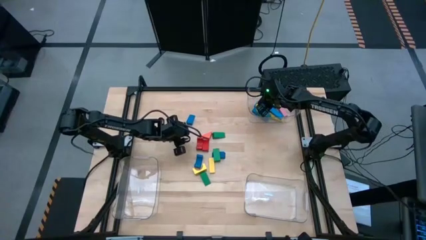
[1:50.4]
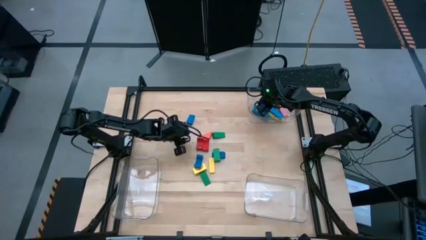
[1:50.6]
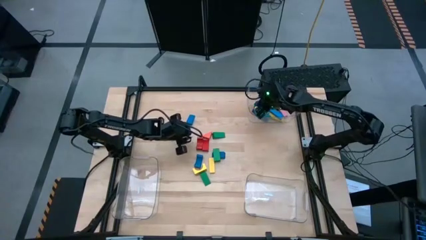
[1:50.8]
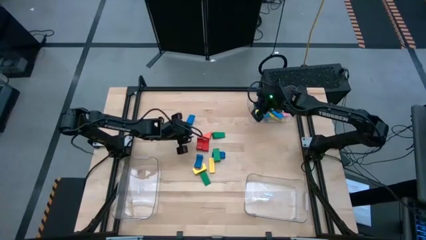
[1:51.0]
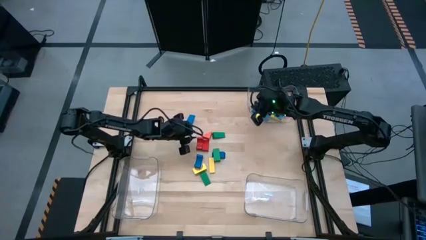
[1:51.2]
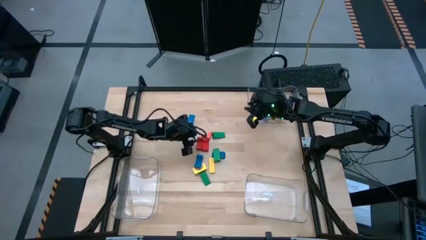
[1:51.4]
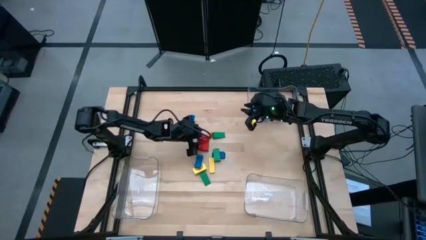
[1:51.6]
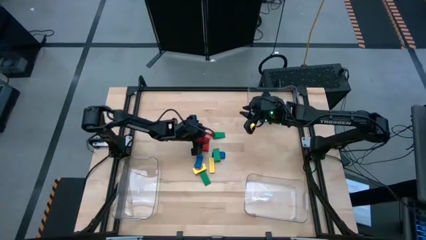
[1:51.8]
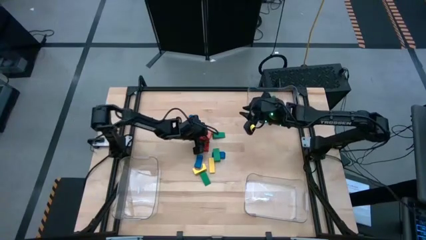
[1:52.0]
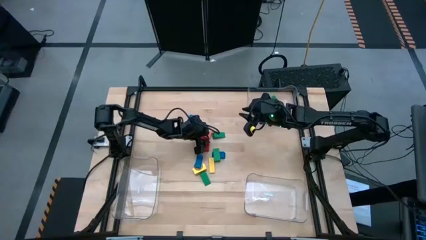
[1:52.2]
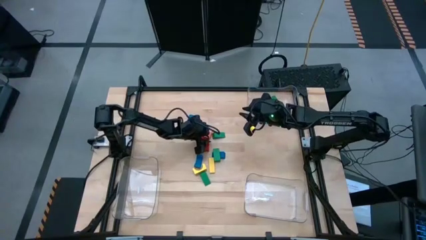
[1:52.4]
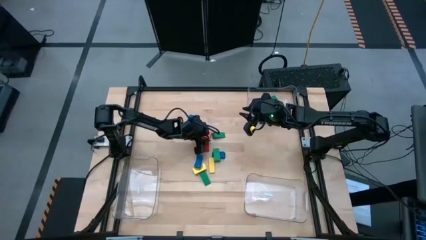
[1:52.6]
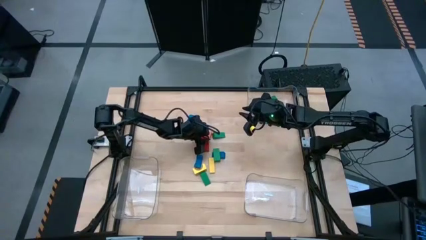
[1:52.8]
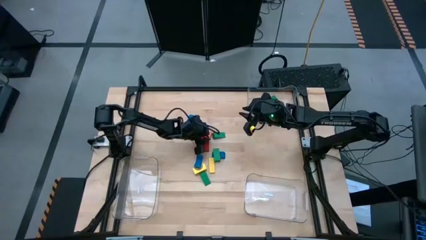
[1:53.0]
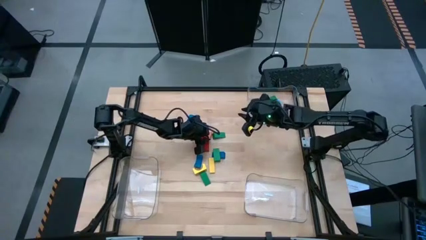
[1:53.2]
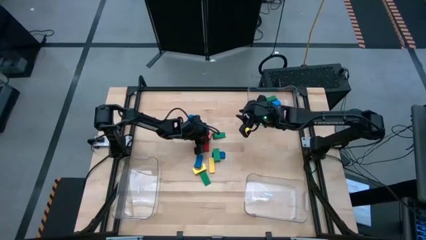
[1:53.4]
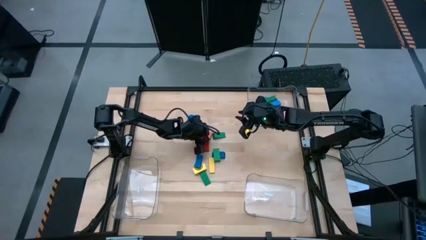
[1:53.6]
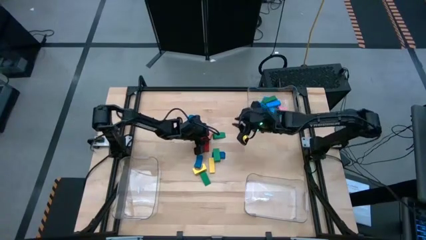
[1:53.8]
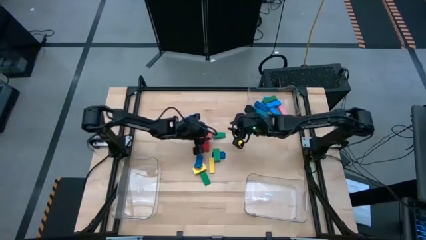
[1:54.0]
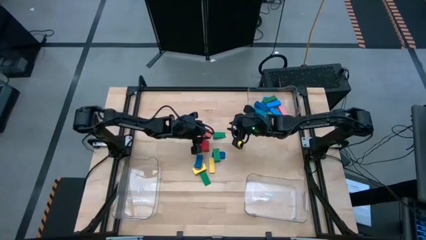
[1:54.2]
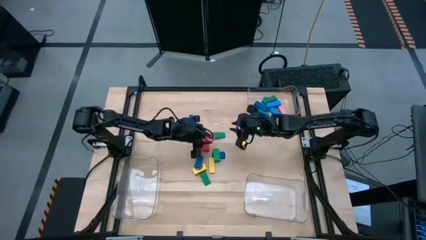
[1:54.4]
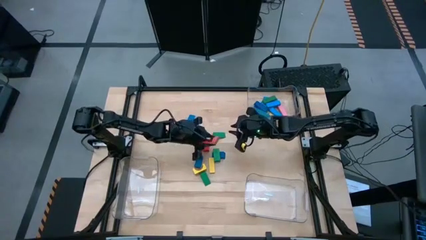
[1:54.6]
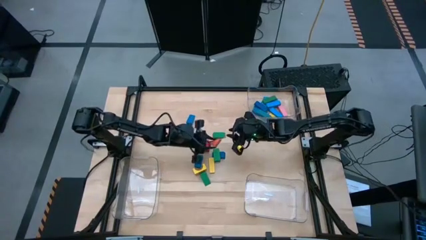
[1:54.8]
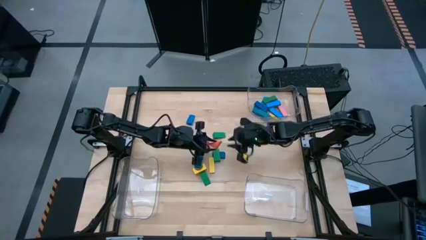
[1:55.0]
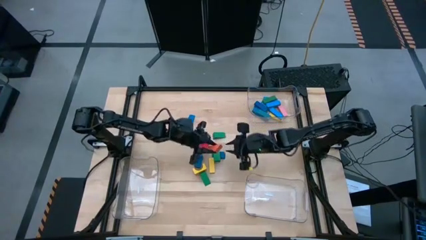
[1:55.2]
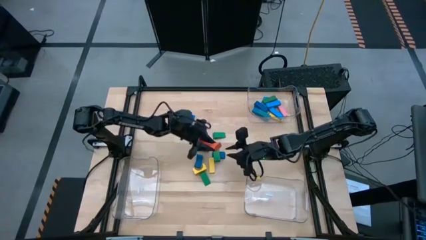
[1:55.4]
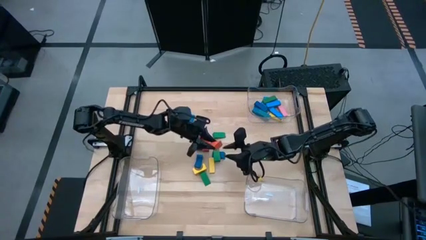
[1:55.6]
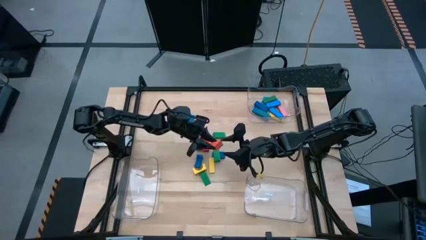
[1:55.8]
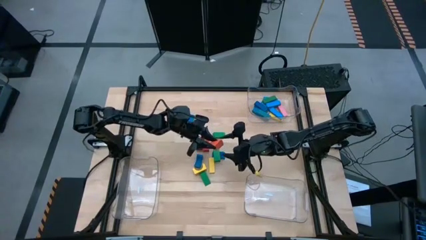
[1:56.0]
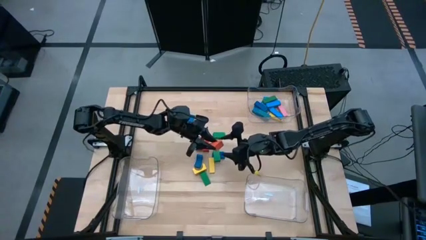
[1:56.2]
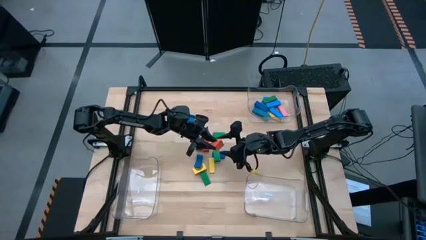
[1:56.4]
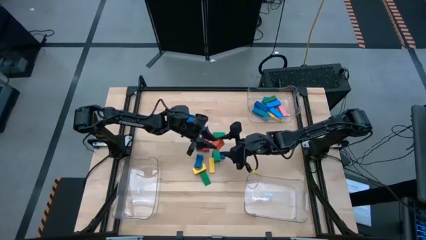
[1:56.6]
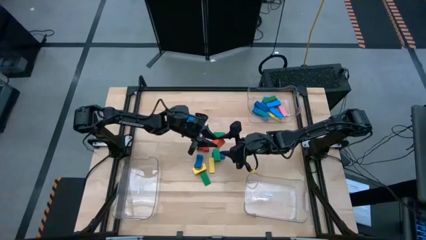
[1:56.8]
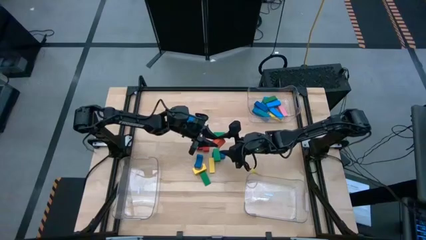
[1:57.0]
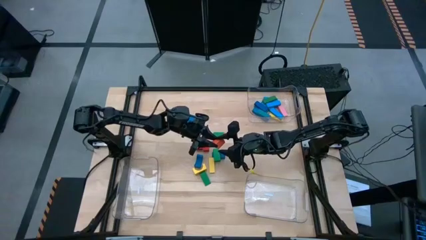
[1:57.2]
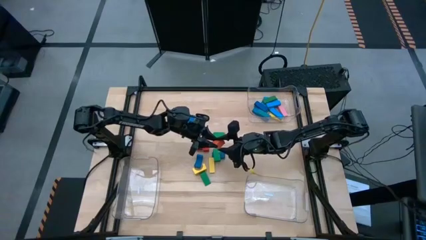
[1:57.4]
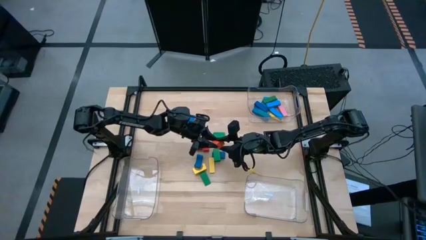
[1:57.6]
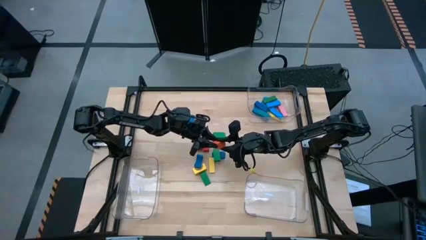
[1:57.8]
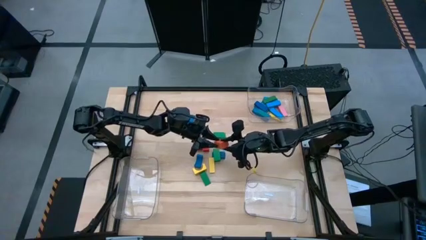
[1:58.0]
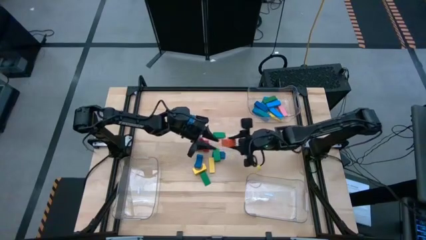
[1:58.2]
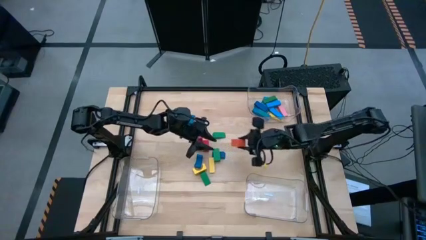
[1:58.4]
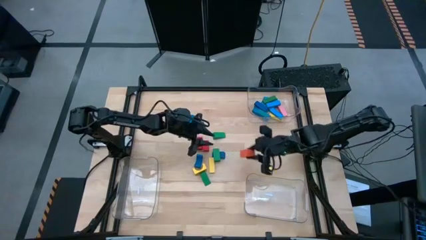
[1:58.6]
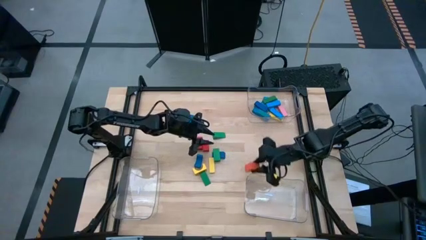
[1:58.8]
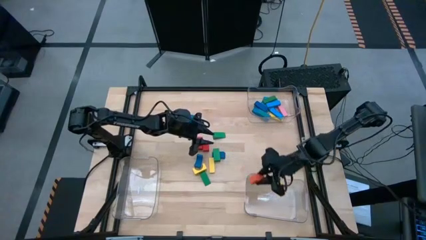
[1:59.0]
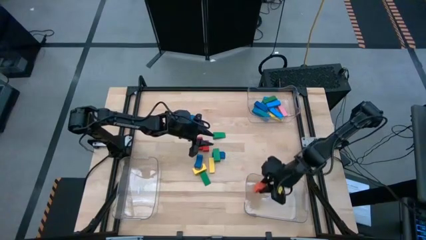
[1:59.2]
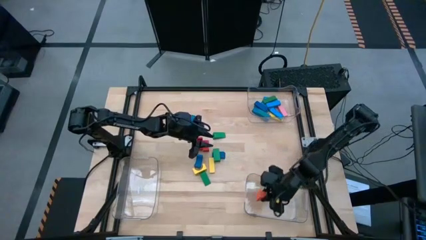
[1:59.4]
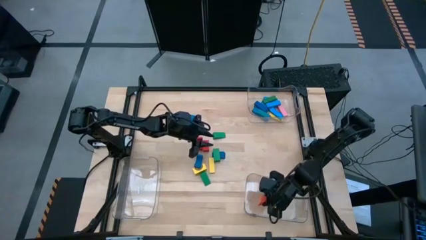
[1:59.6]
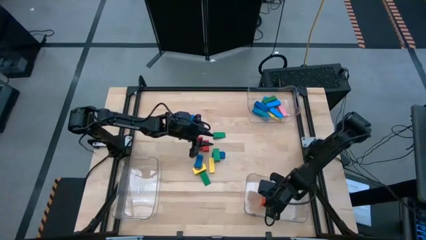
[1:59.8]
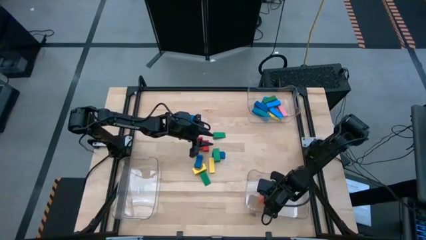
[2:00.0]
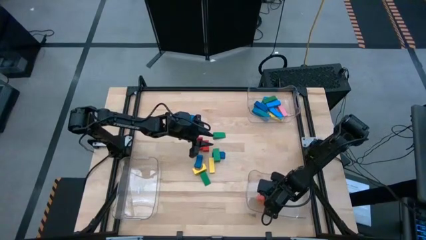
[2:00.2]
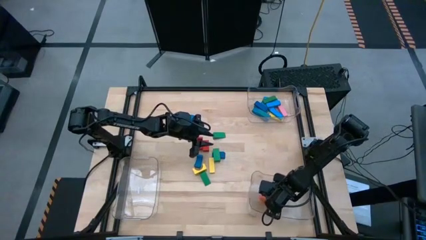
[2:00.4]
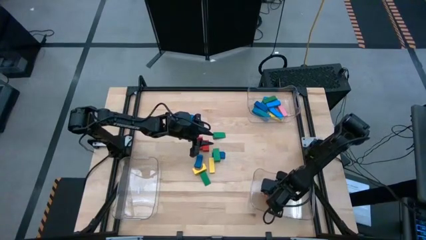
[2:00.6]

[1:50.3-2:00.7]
Task: Sort blocks by size
Put the orange triangle block into the bottom right transparent bin

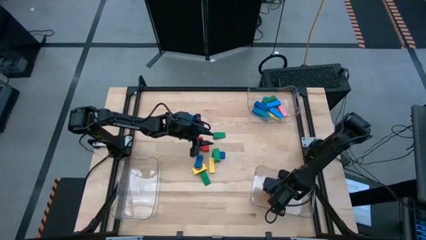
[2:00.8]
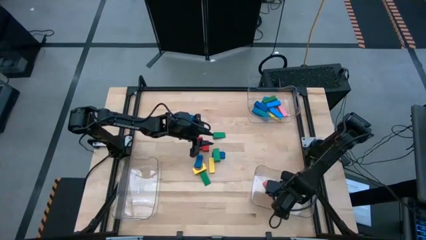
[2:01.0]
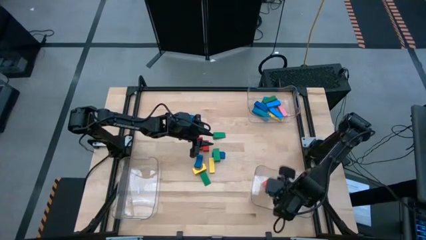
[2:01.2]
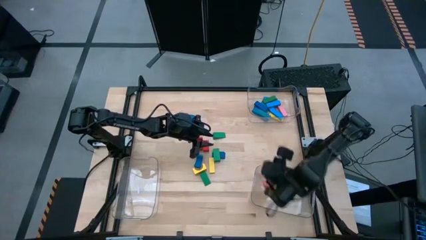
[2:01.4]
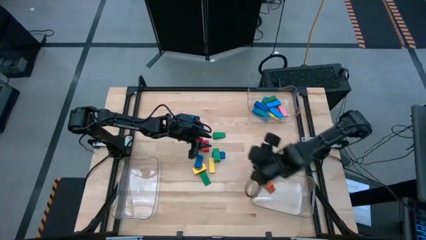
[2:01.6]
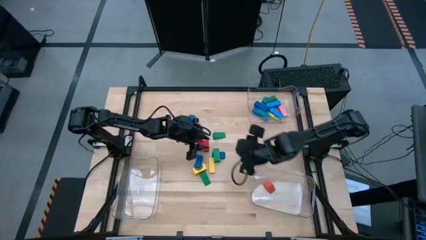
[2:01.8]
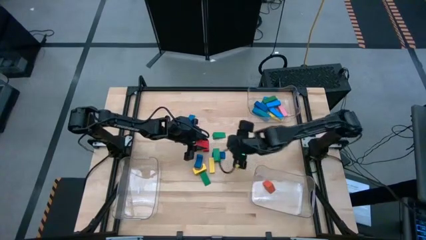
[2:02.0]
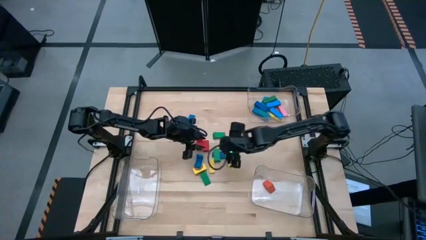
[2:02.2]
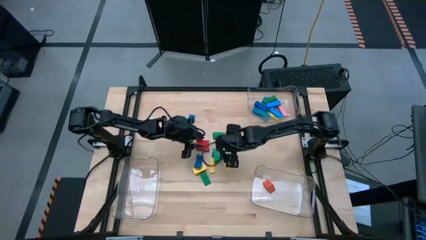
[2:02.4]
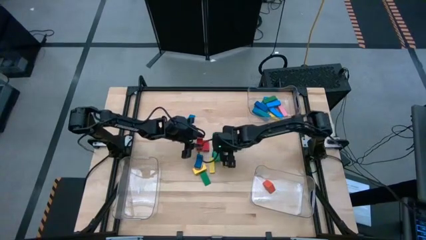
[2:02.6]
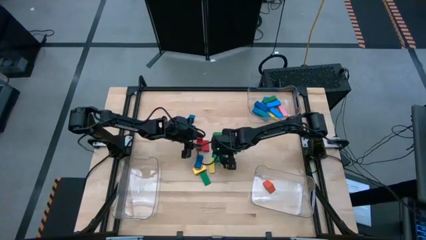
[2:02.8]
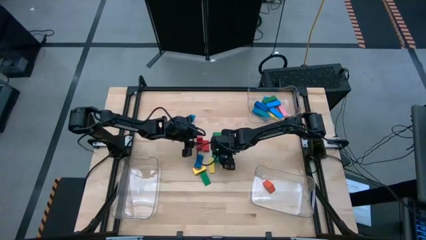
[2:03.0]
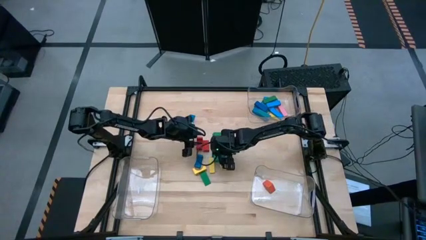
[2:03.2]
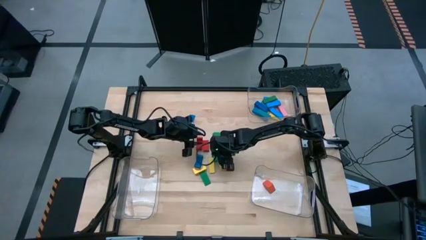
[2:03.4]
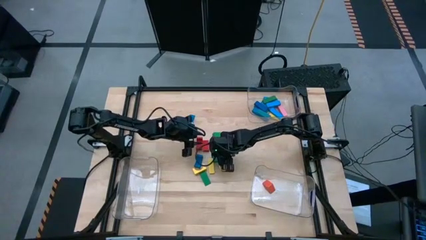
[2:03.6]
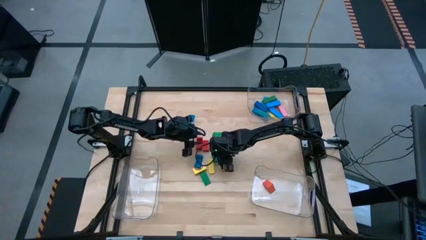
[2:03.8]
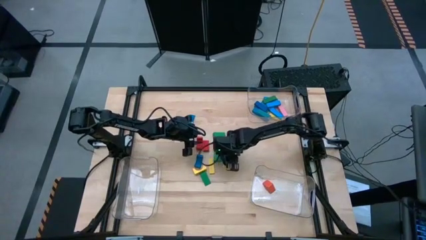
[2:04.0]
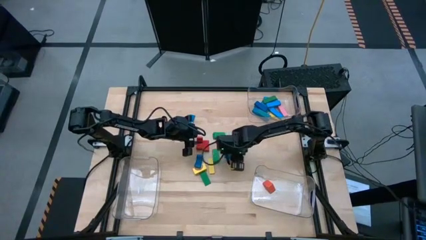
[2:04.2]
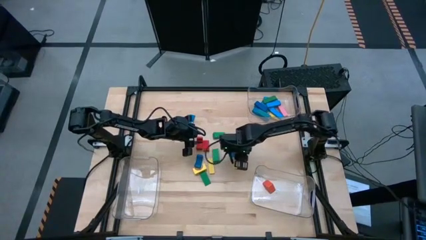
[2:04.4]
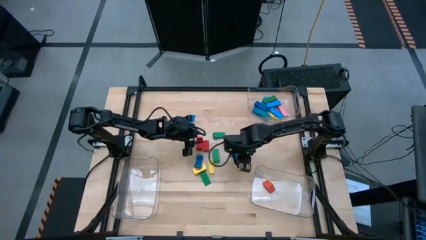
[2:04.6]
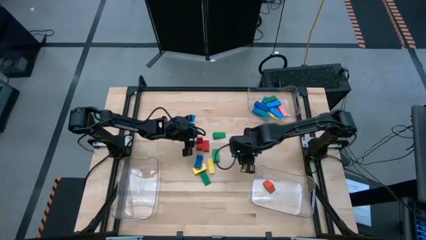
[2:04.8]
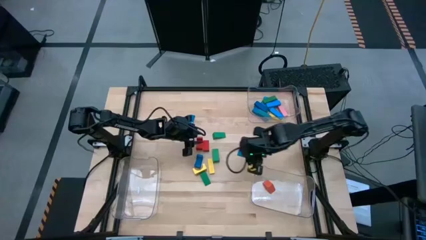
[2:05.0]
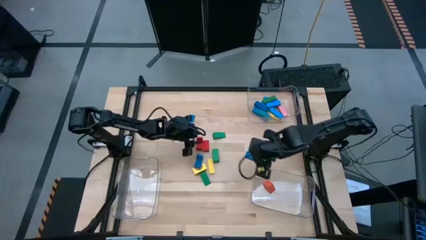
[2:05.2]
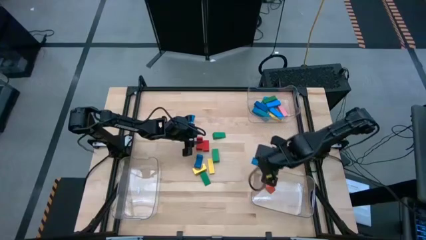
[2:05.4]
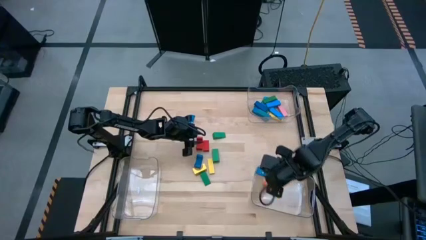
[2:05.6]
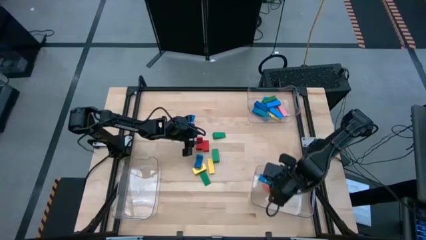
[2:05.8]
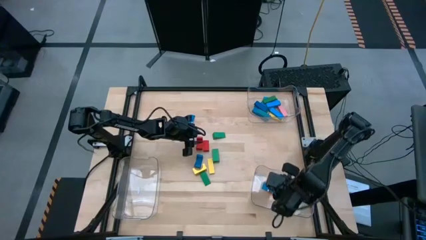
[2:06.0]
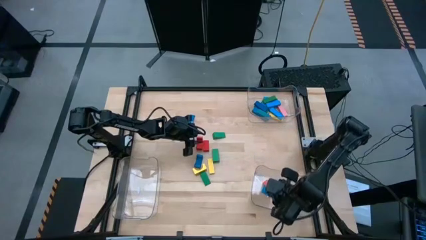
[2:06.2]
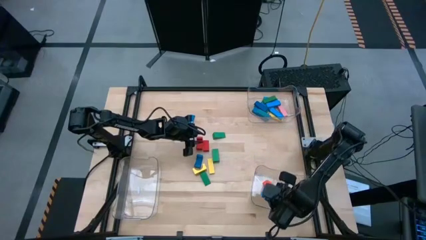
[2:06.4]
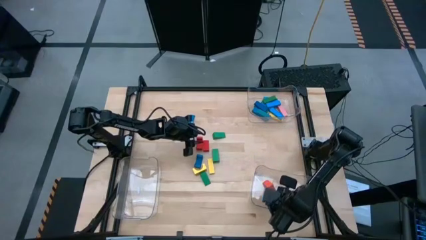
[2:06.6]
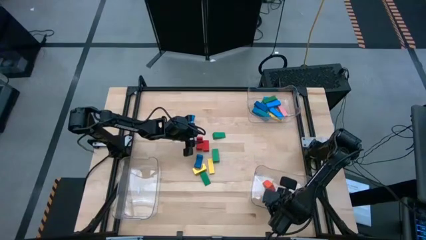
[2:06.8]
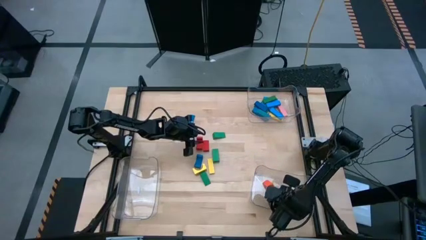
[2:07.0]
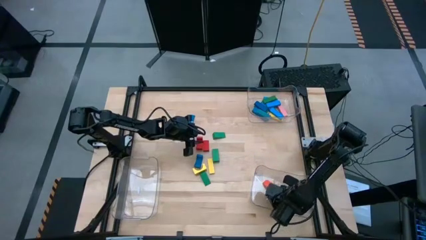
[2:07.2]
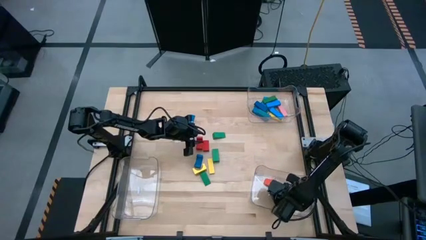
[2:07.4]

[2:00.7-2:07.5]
Put the blue triangle block into the bottom right transparent bin
